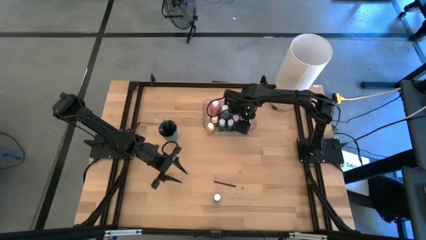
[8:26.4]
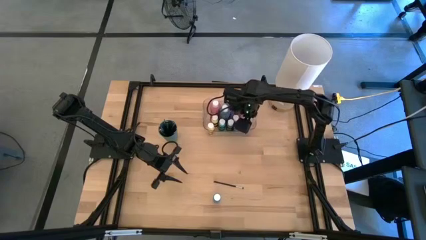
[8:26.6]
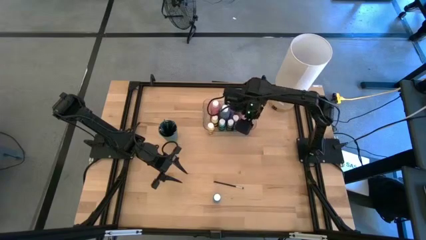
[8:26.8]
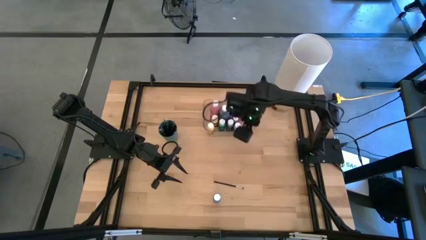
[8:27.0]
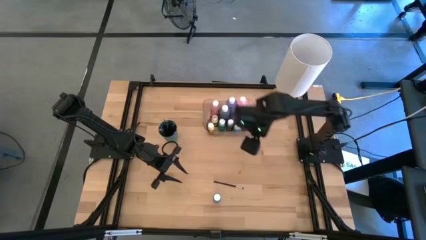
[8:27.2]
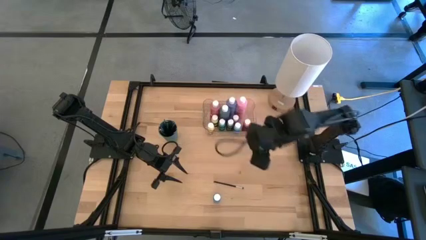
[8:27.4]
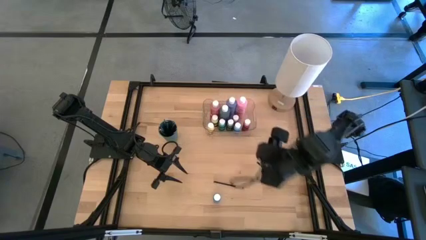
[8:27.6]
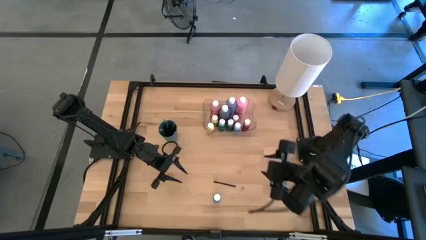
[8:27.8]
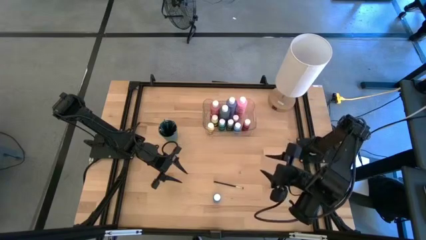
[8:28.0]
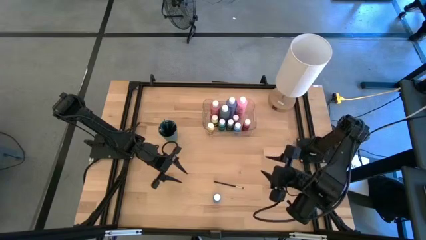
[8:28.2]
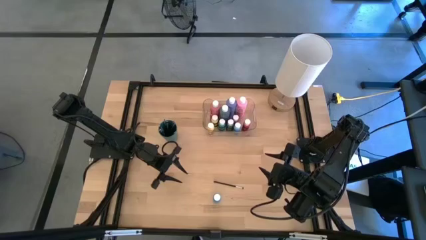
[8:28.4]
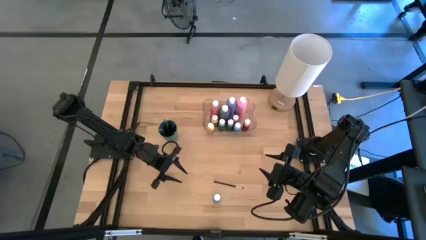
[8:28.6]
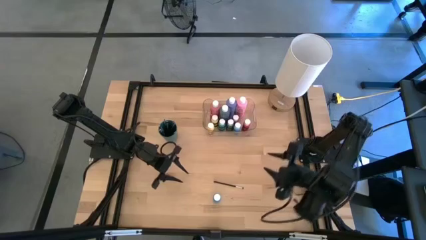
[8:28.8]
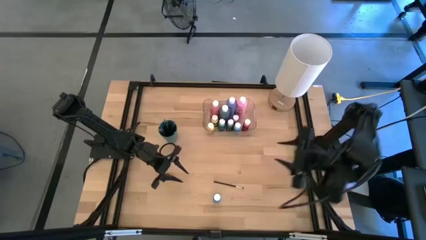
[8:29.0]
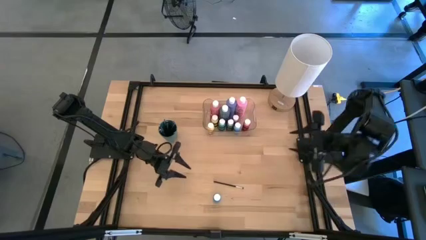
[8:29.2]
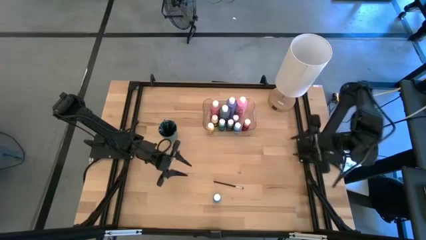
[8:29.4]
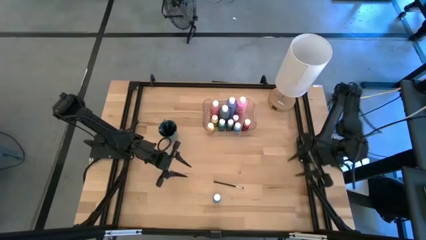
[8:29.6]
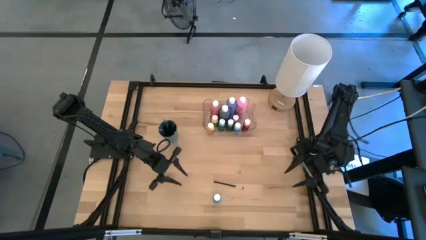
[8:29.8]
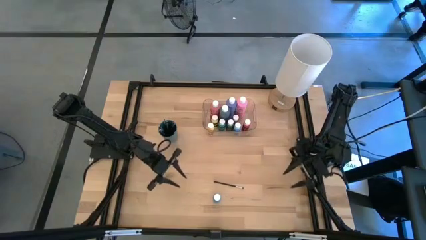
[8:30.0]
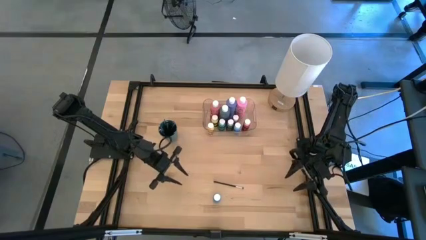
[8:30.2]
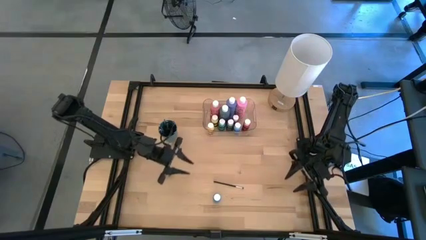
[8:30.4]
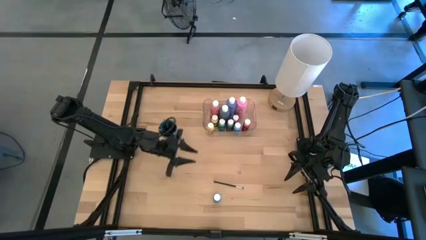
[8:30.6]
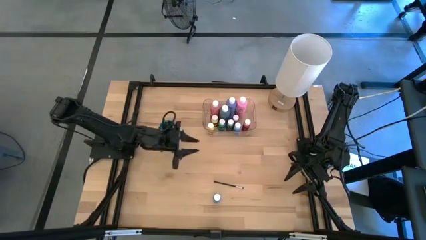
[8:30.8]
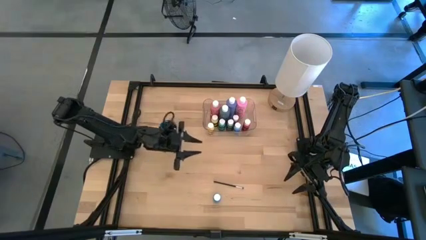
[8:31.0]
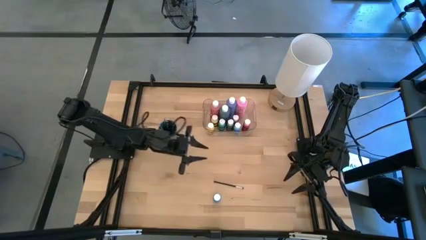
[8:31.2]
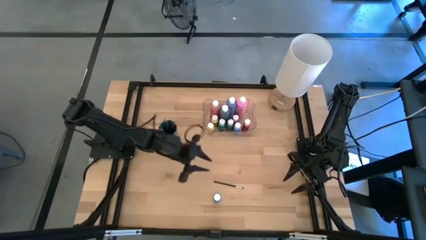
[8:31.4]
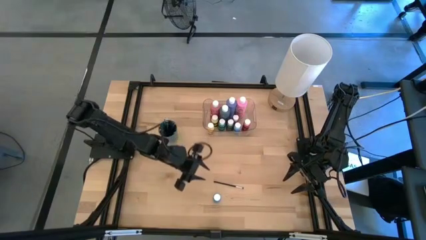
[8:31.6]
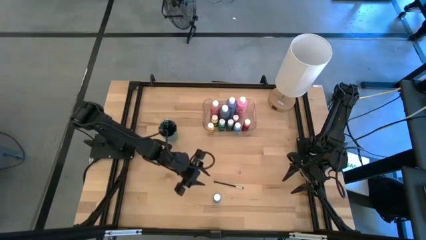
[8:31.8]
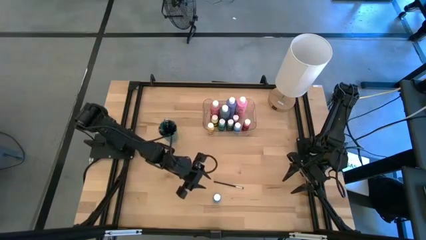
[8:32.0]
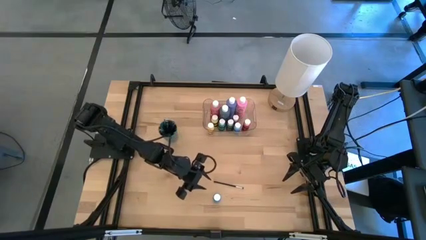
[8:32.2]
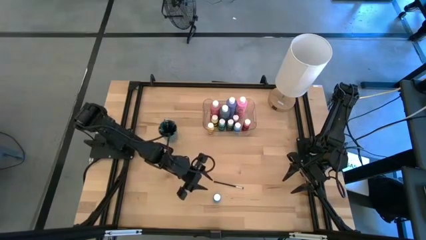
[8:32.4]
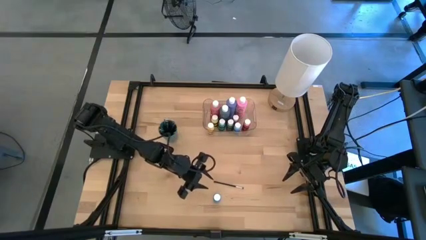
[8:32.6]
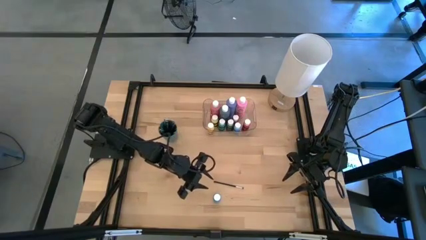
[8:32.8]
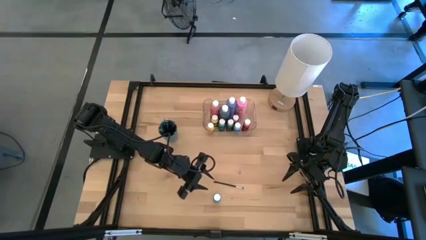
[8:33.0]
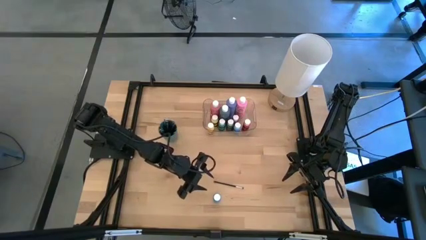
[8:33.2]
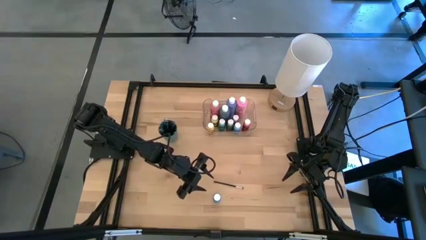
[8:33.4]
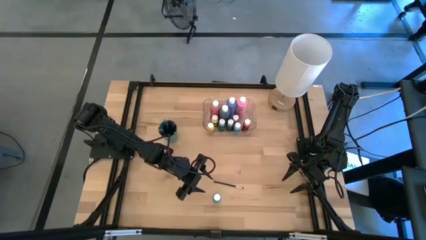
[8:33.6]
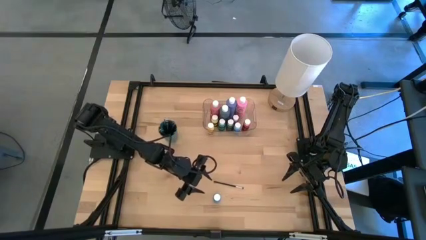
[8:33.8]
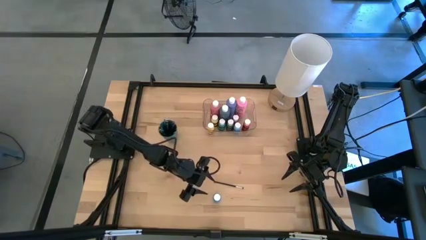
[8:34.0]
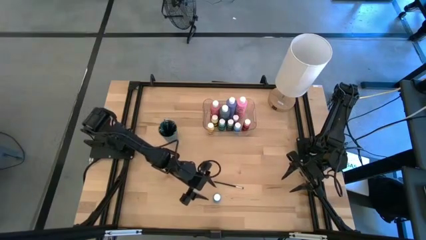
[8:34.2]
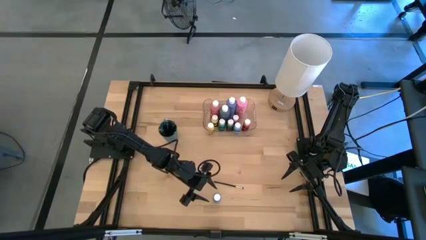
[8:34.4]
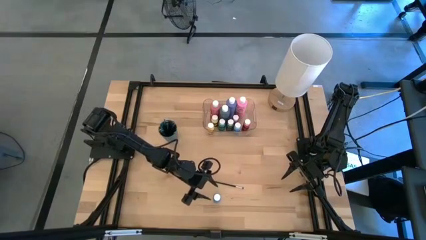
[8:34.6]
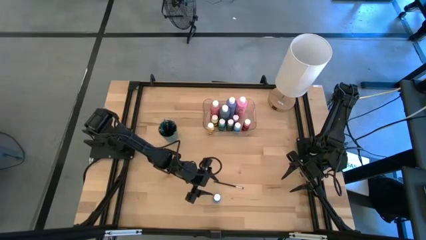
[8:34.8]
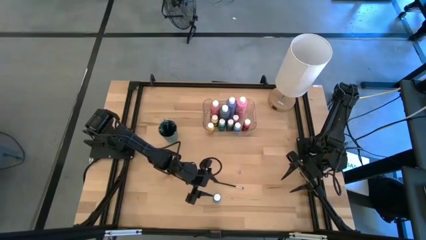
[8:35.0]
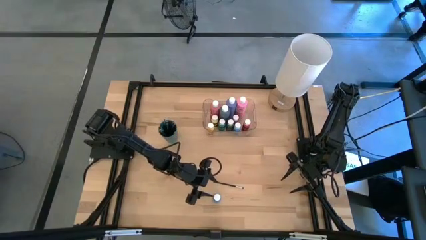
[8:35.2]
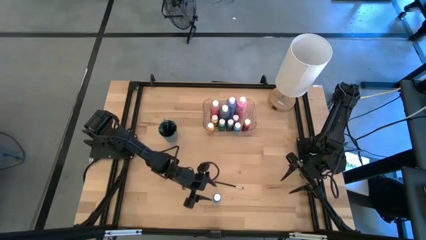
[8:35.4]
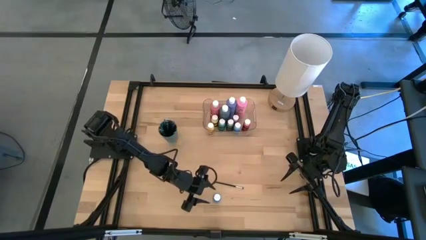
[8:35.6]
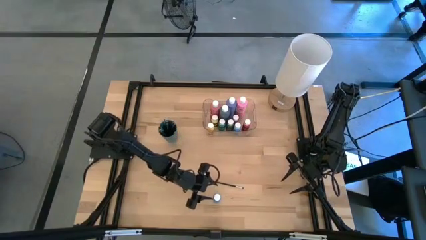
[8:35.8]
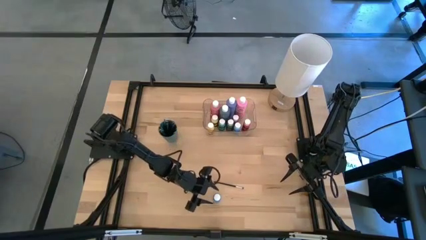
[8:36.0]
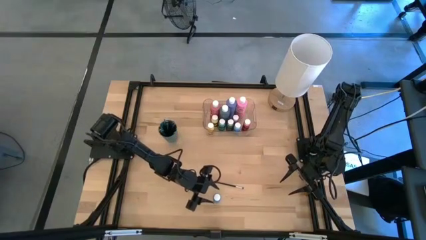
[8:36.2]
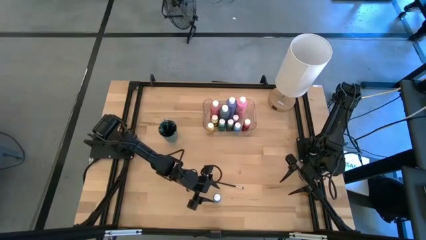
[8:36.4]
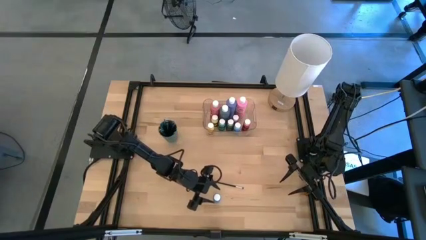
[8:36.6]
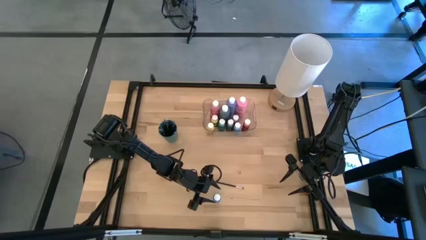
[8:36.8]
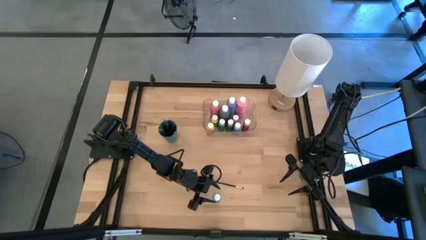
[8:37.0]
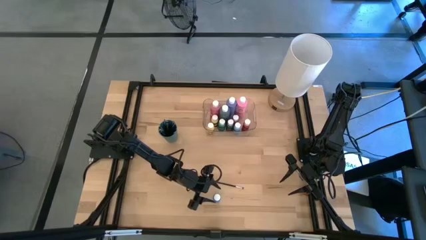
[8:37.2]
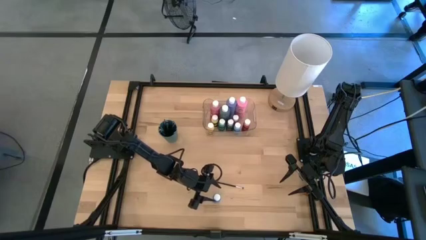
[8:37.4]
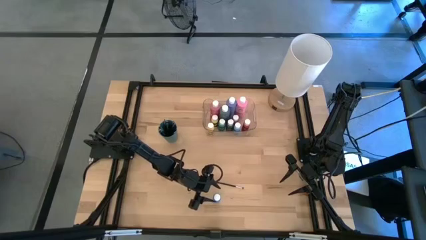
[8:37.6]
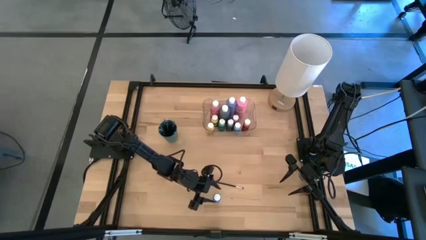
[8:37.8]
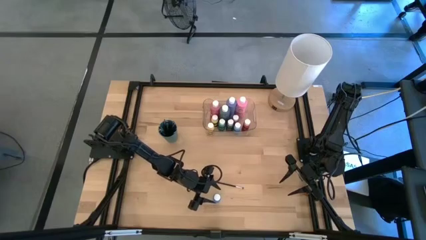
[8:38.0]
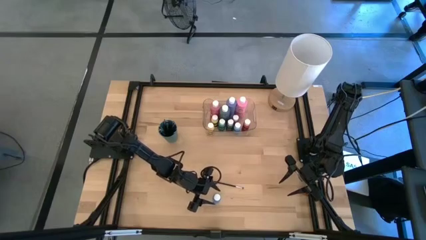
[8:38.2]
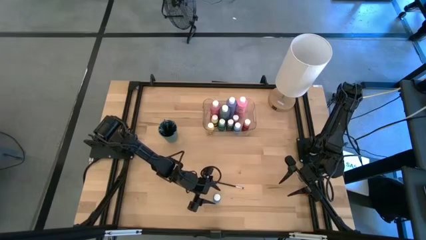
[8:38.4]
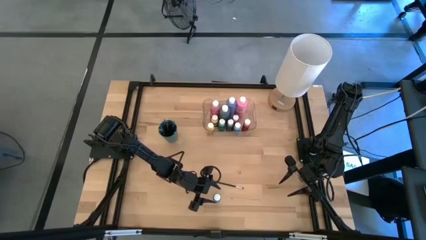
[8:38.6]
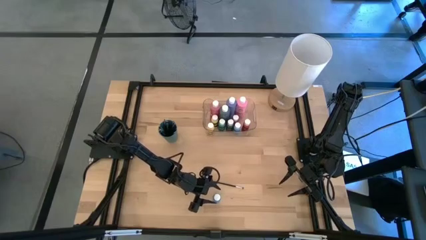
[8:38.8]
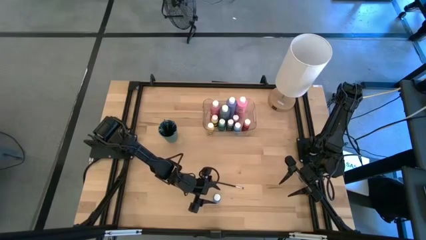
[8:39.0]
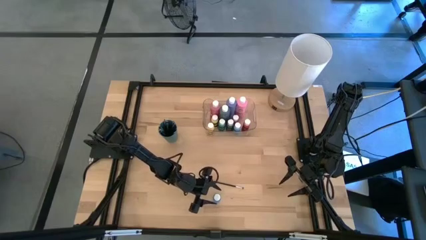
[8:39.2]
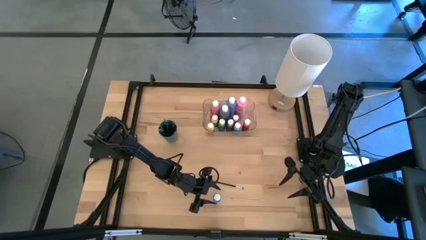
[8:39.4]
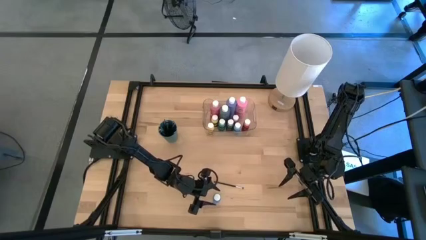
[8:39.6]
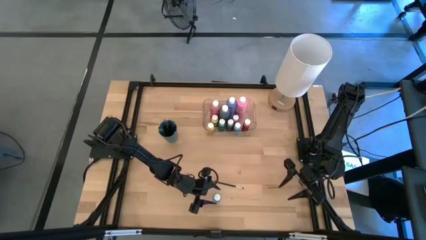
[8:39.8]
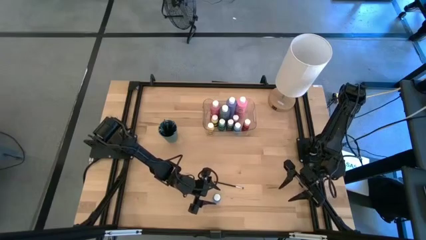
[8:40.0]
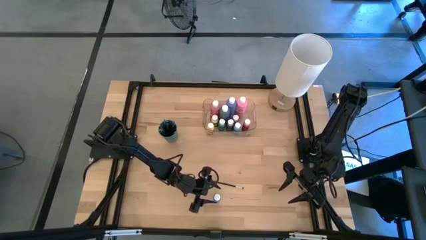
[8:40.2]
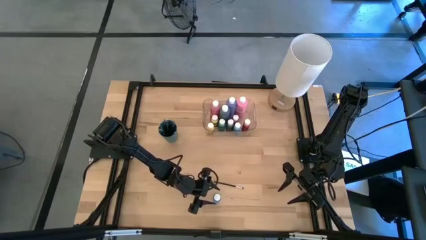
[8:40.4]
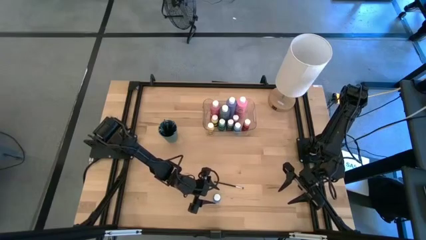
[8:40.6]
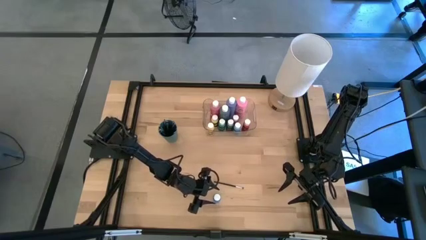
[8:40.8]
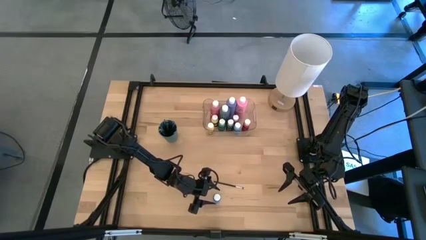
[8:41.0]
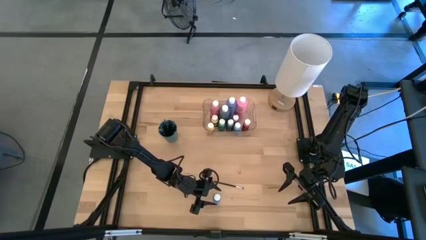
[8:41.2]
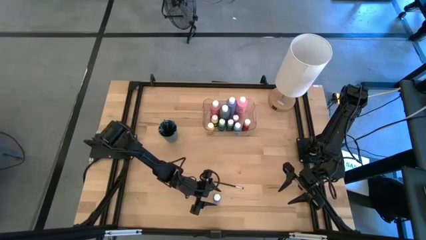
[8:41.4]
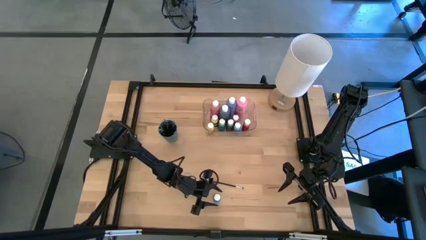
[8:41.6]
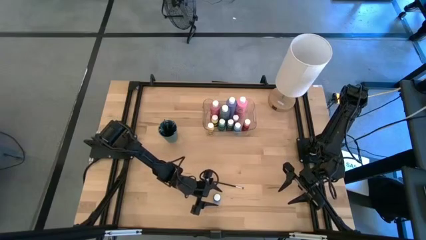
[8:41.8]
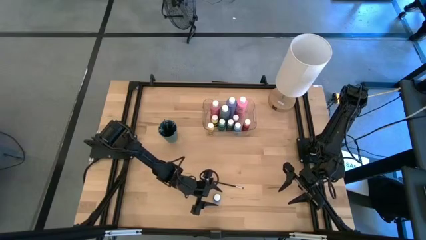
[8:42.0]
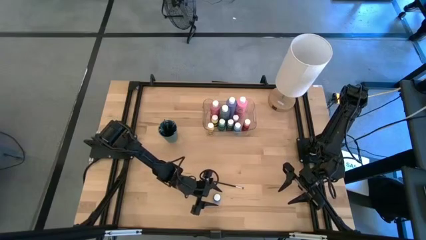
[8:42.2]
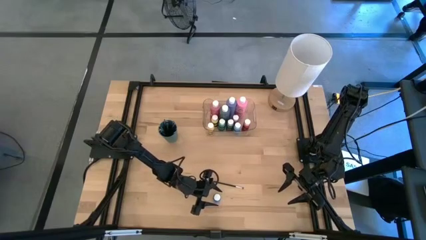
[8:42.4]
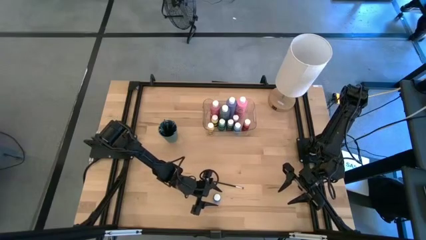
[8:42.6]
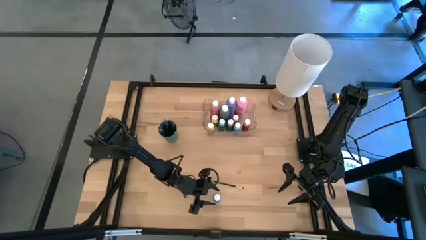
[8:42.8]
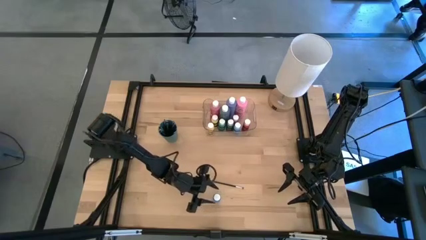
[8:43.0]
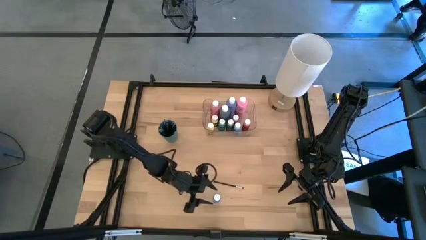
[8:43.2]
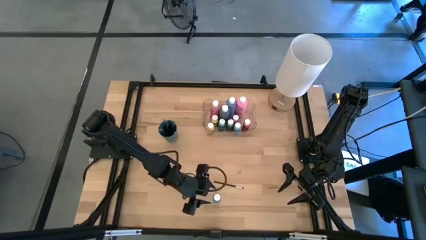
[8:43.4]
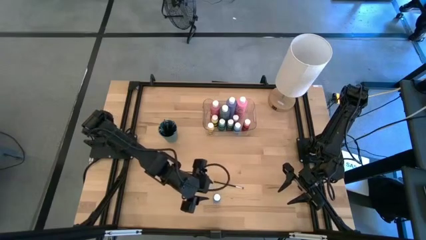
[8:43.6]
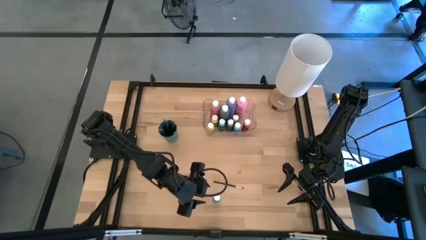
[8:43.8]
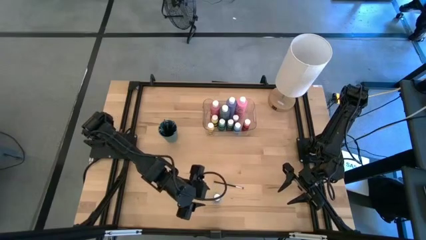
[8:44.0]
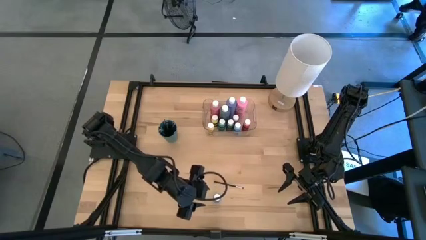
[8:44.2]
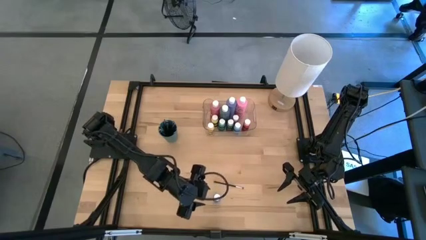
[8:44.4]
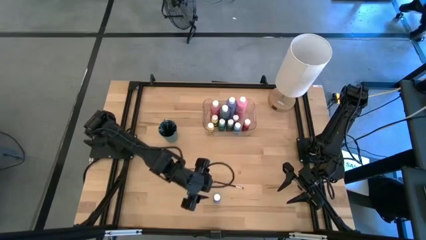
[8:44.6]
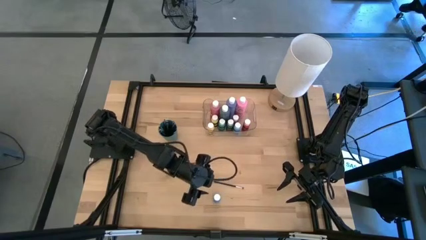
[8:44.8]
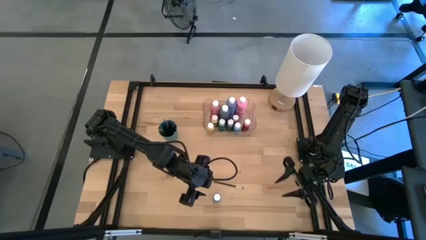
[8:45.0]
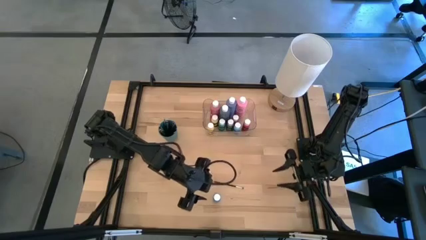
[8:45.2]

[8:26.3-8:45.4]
Task: Pick & Place Paint Supplies
Put the blue paint bottle into the transparent bin
